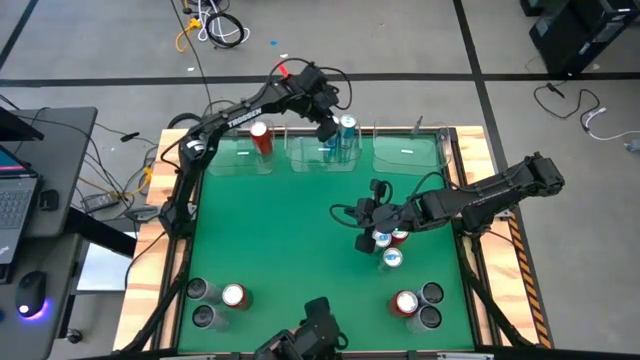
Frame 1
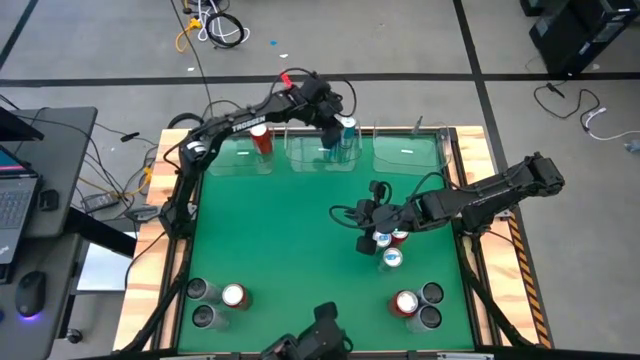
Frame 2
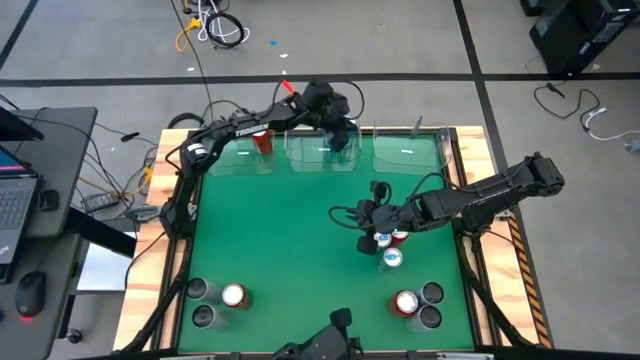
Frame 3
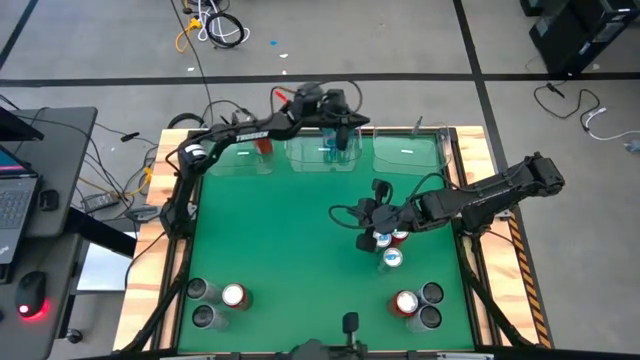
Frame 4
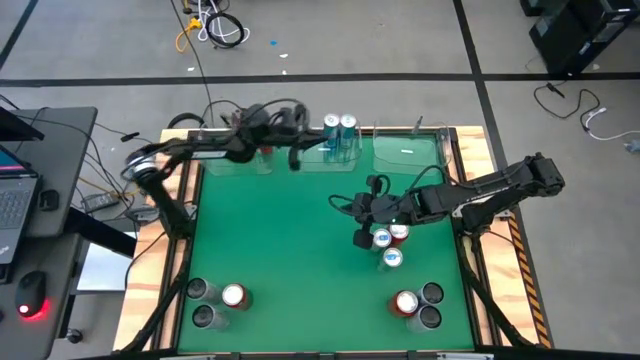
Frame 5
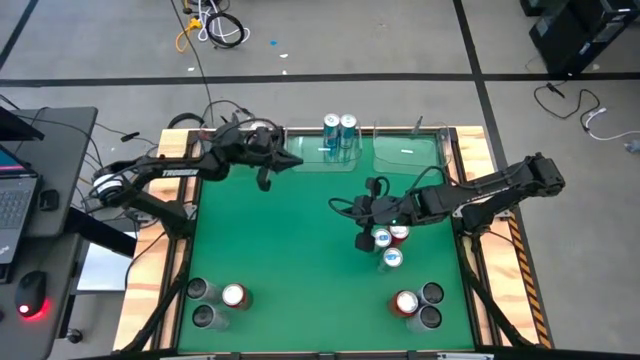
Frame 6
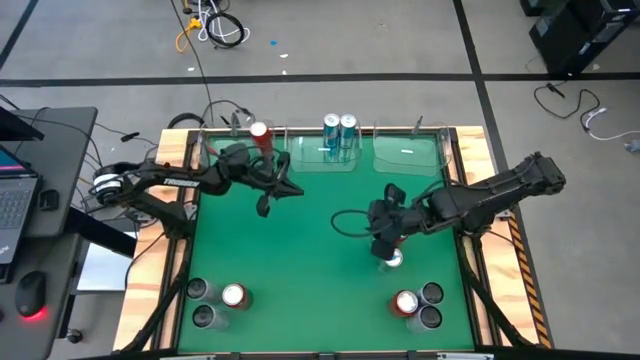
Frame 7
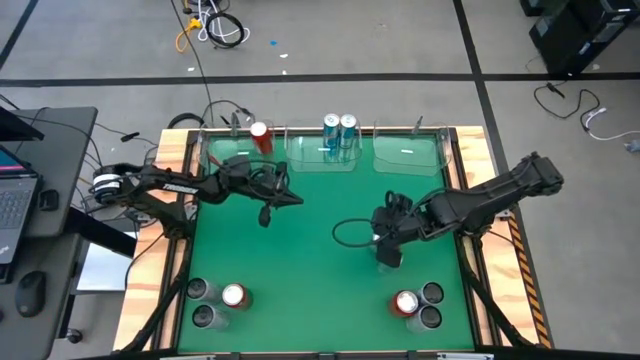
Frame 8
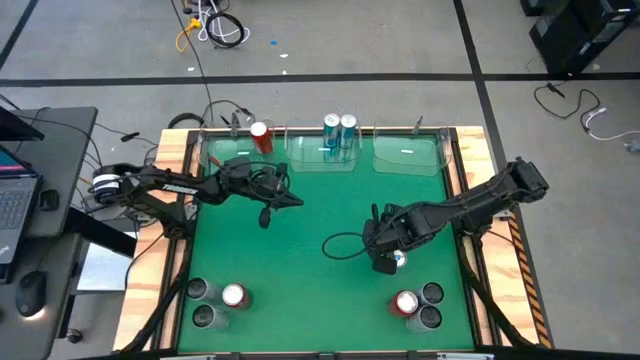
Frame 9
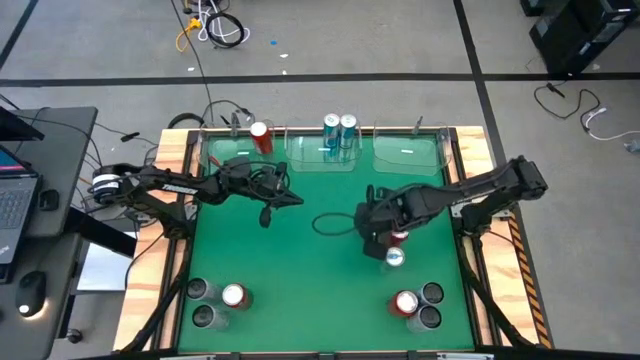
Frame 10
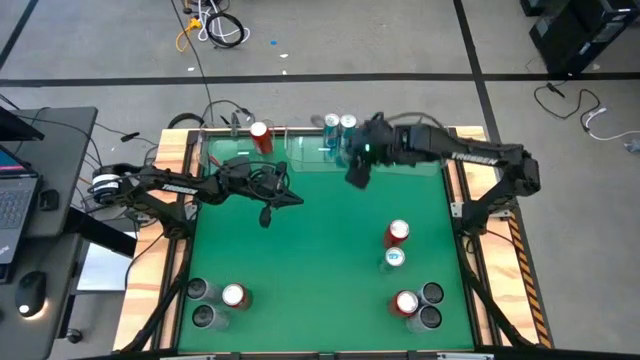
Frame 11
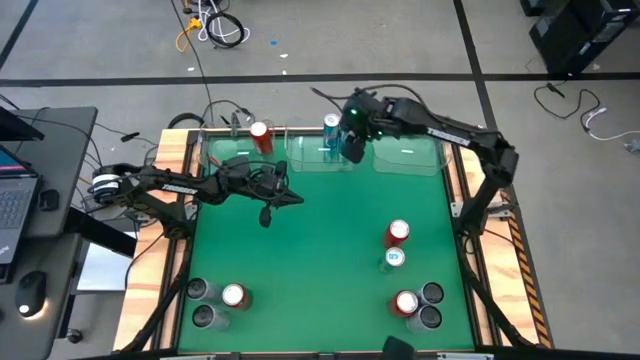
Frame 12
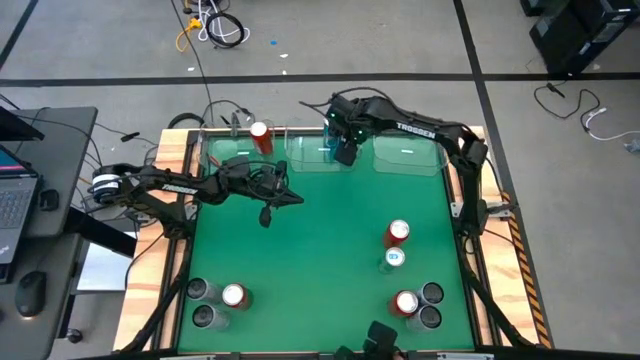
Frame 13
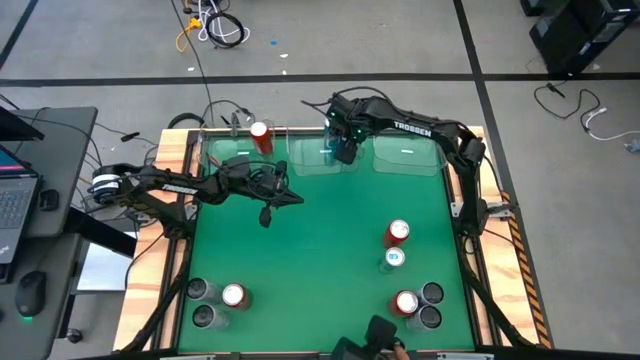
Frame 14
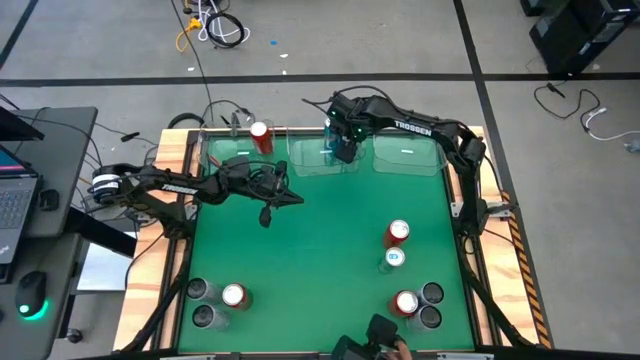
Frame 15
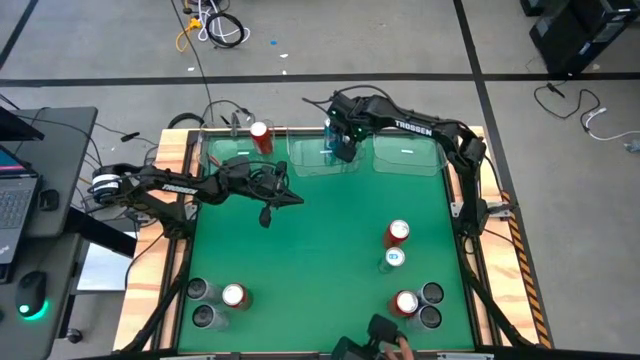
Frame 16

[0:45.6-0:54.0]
Task: Sort soda cans
Put the blue soda can into the transparent middle bin

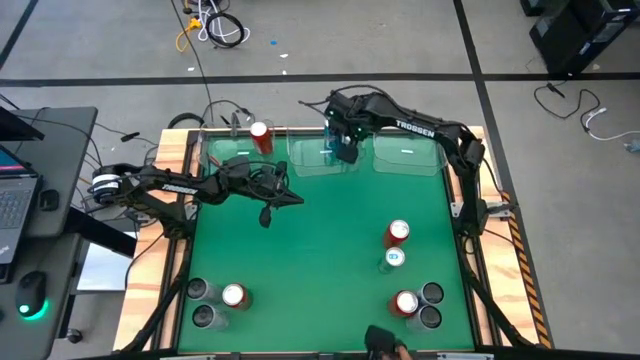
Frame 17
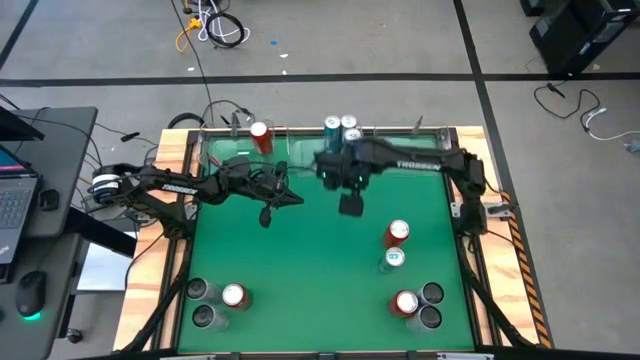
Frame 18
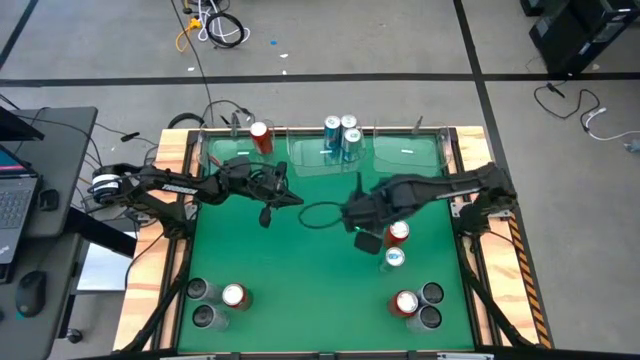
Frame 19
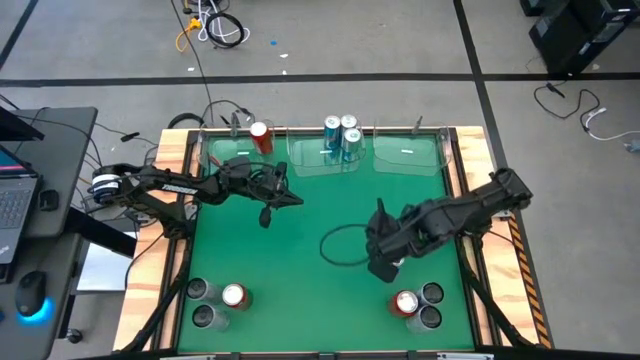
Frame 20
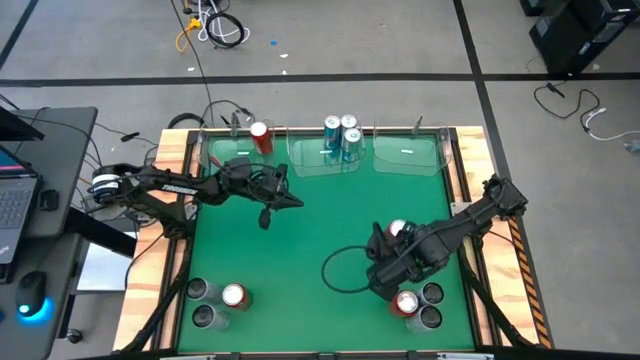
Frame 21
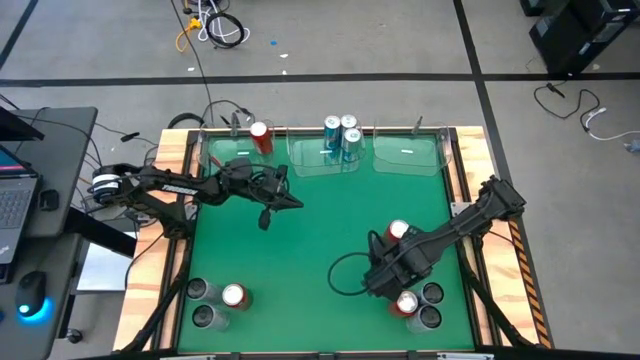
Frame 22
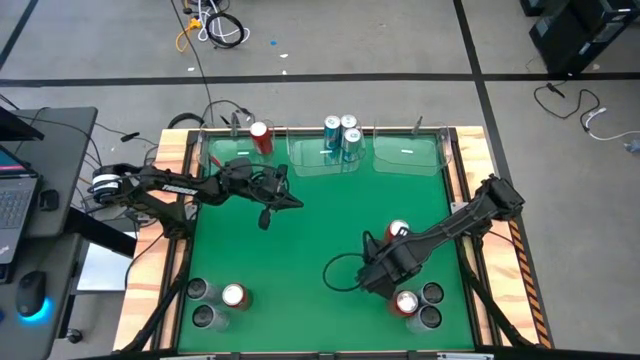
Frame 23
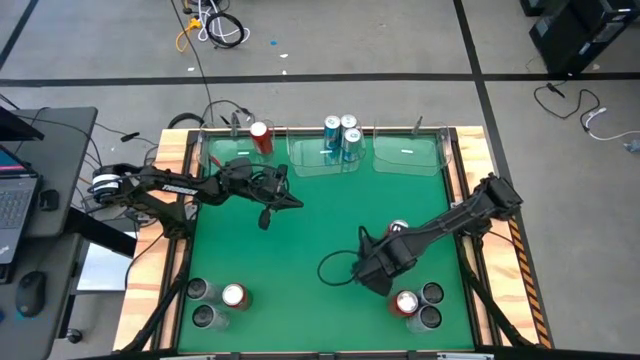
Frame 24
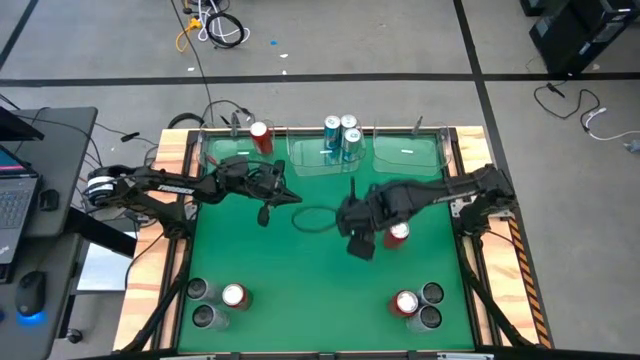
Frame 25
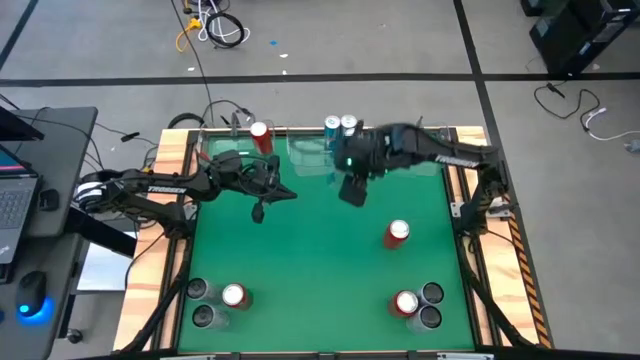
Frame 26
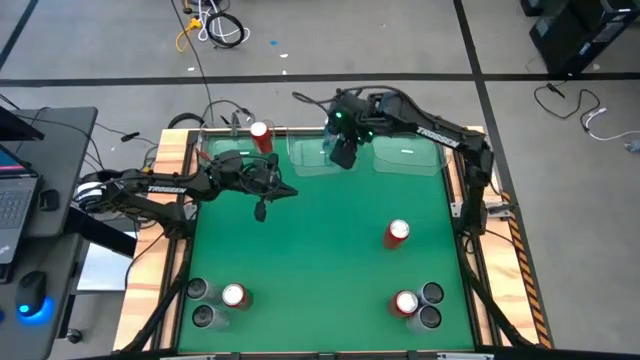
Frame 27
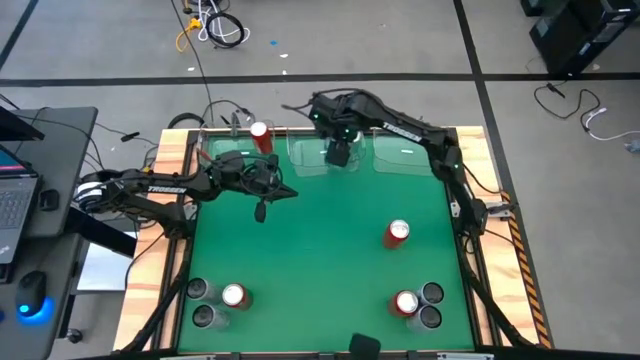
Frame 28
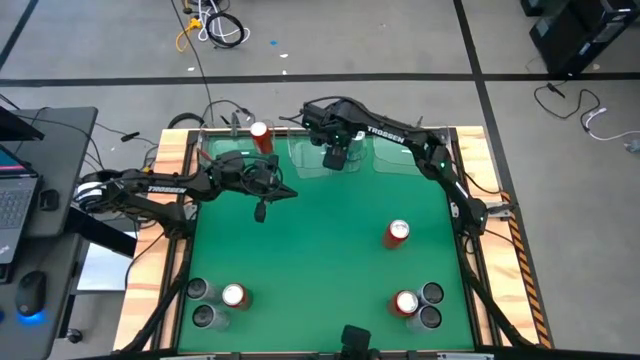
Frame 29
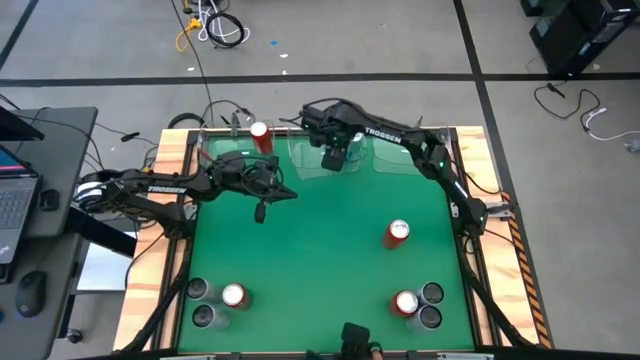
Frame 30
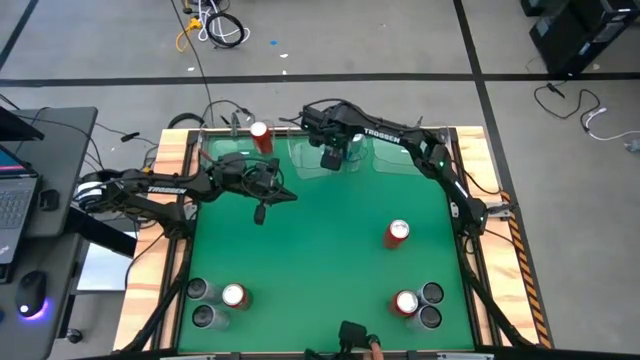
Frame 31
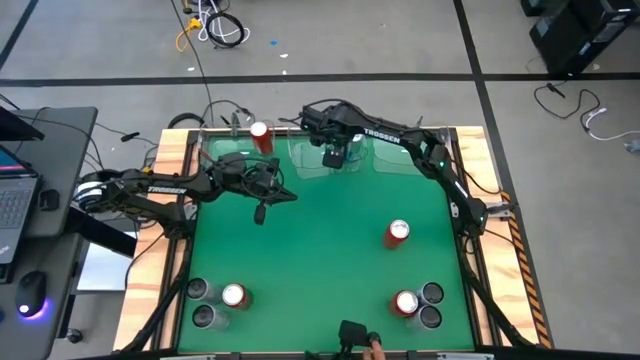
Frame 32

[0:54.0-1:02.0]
Put the blue soda can into the transparent middle bin

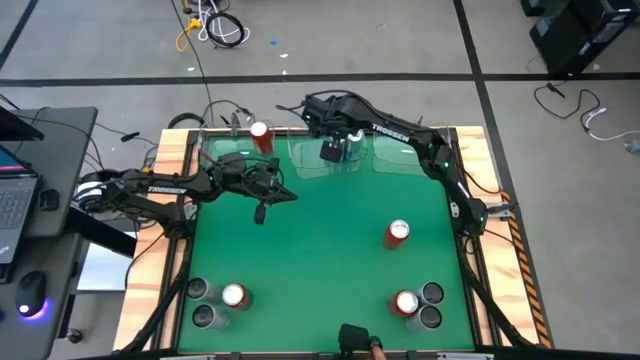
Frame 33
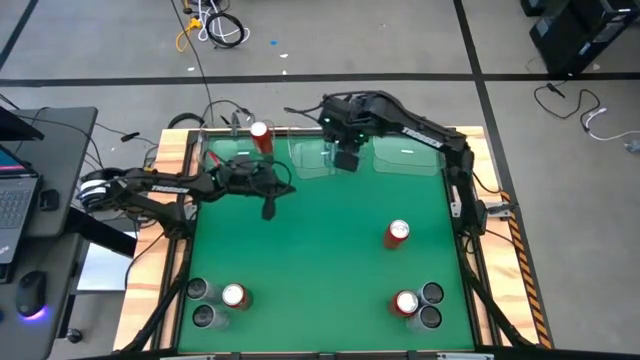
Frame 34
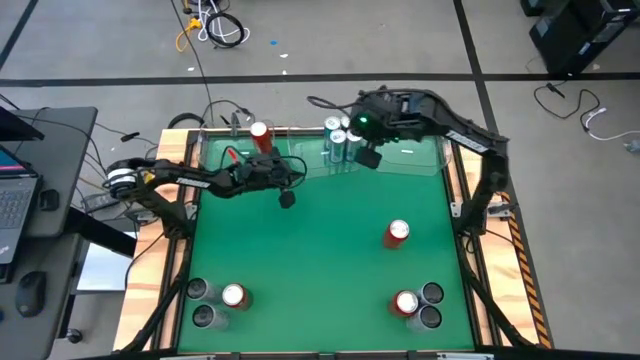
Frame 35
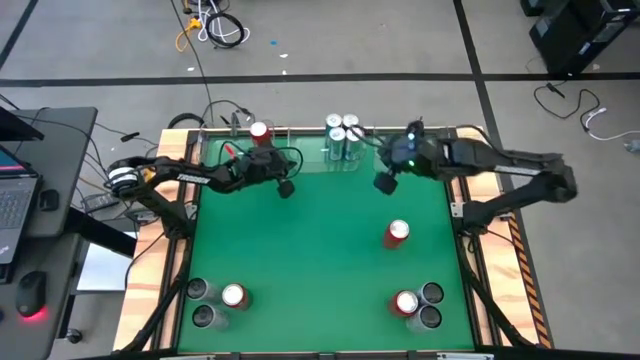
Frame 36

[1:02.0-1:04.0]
Adjust the middle transparent bin on the table

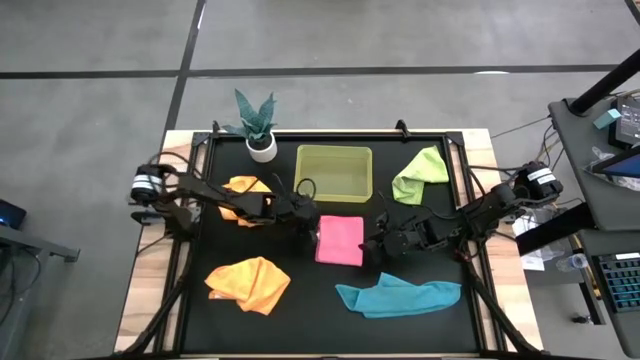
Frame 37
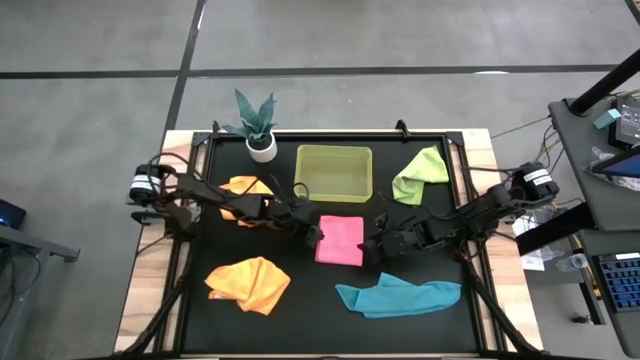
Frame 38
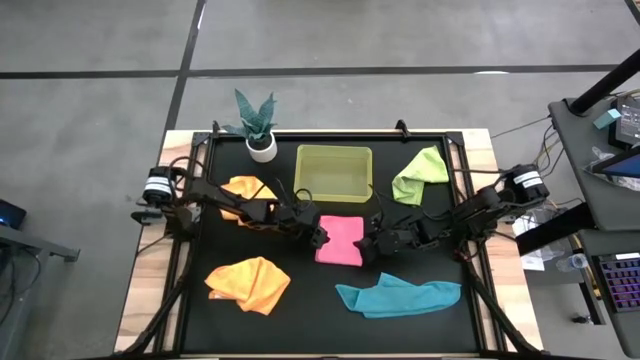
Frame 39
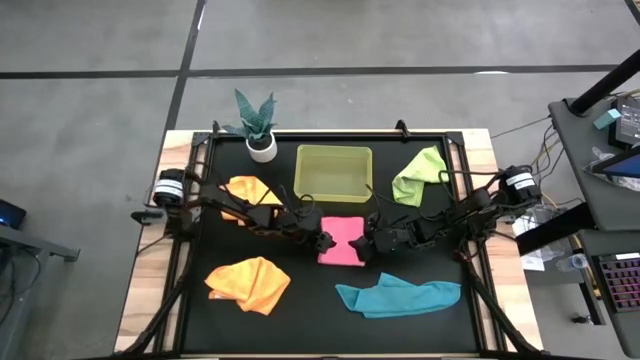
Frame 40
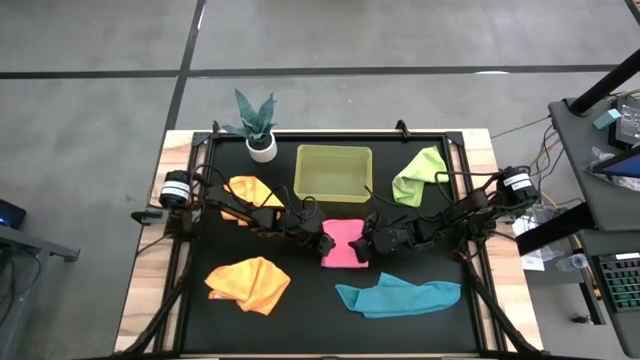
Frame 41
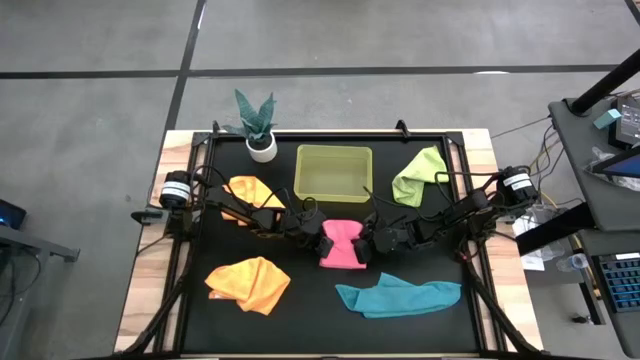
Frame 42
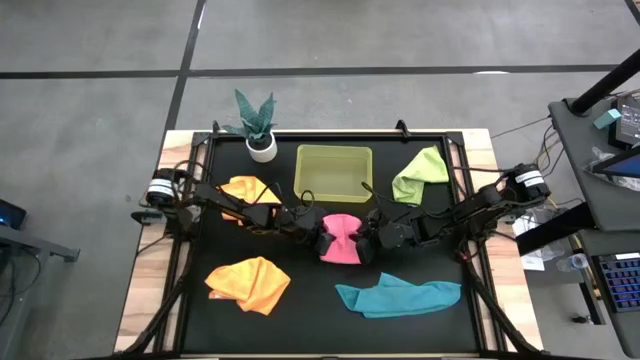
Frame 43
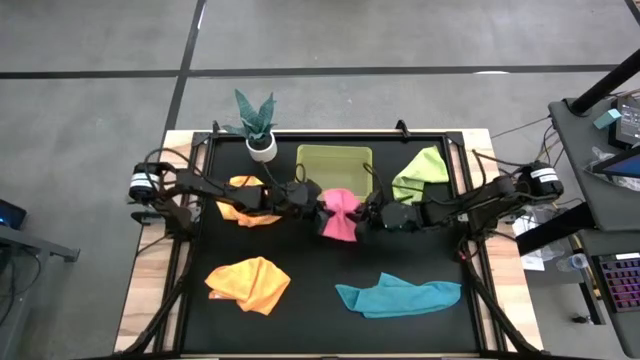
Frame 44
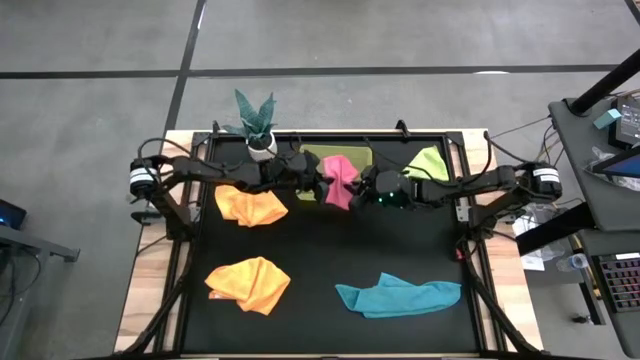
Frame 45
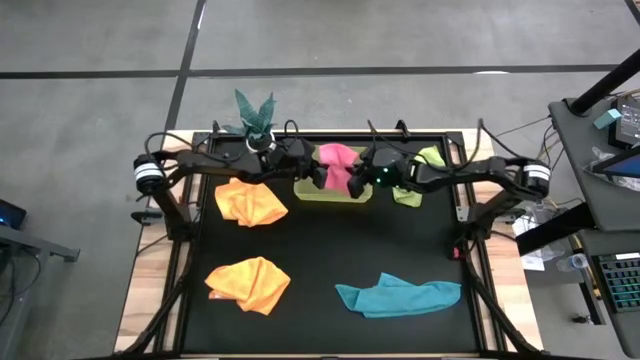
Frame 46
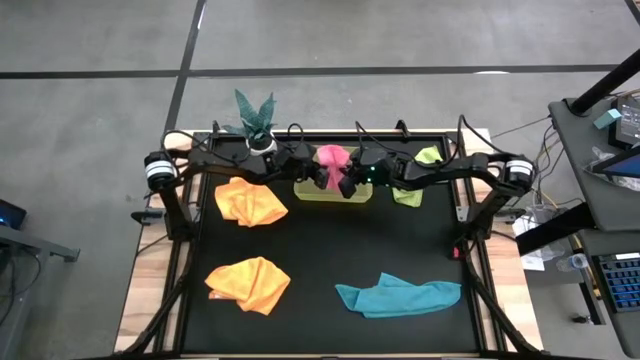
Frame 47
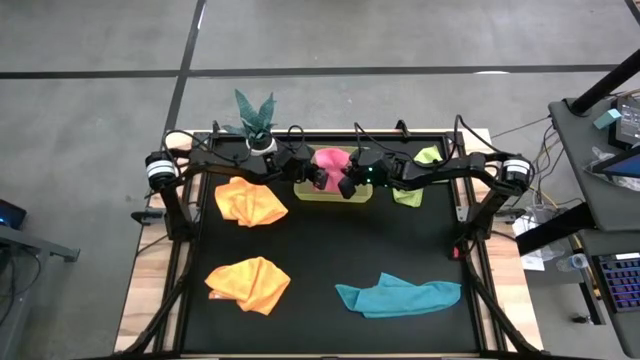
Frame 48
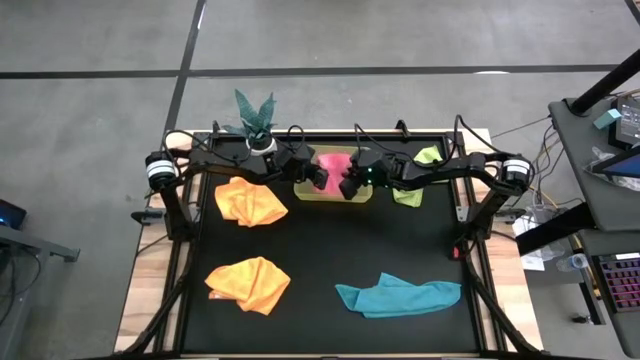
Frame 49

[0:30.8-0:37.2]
Task: Fold microfiber towels
Put the folded pink towel into the bin
